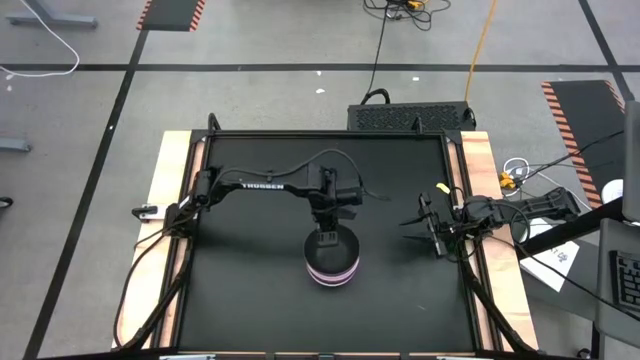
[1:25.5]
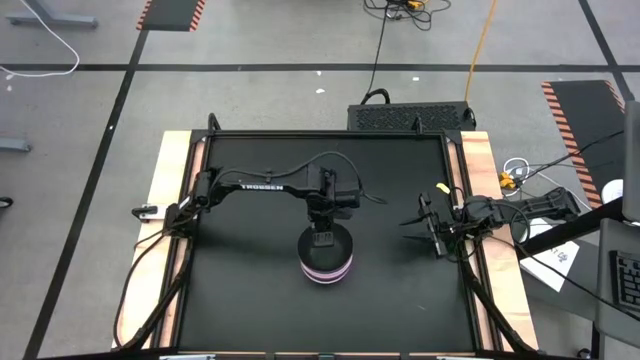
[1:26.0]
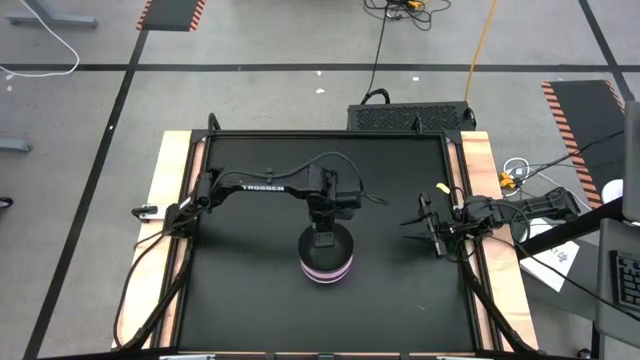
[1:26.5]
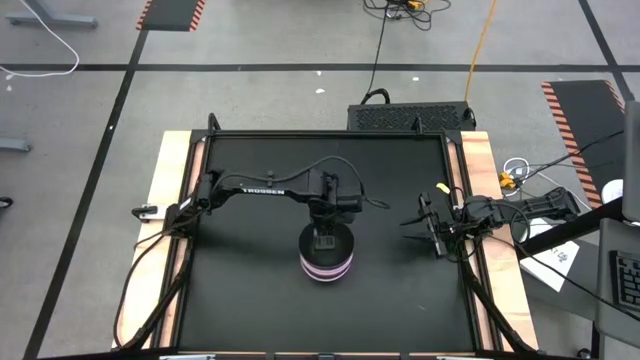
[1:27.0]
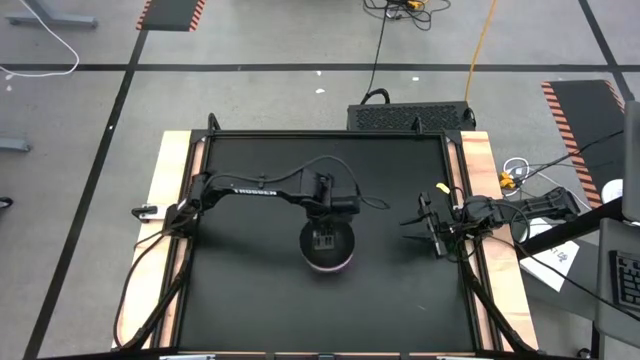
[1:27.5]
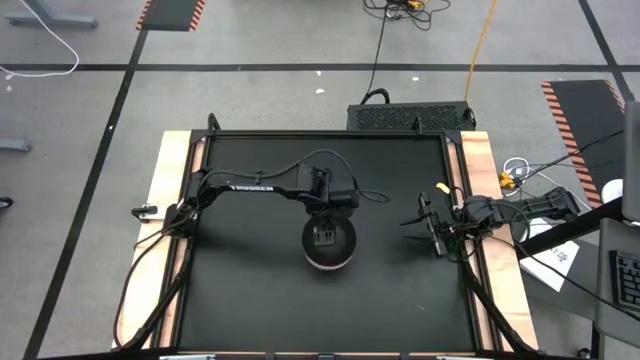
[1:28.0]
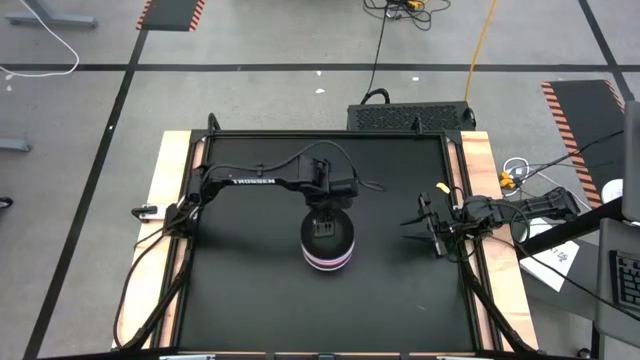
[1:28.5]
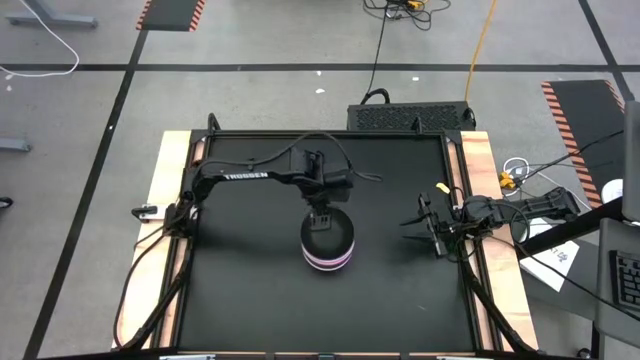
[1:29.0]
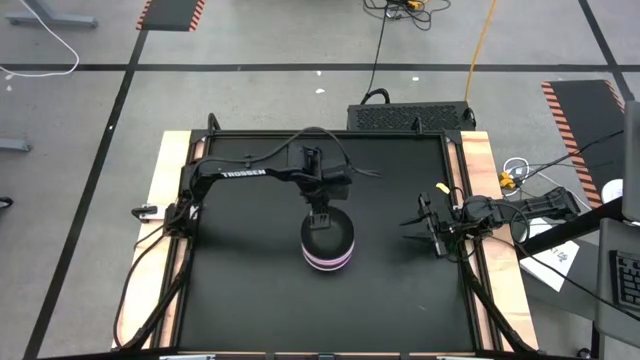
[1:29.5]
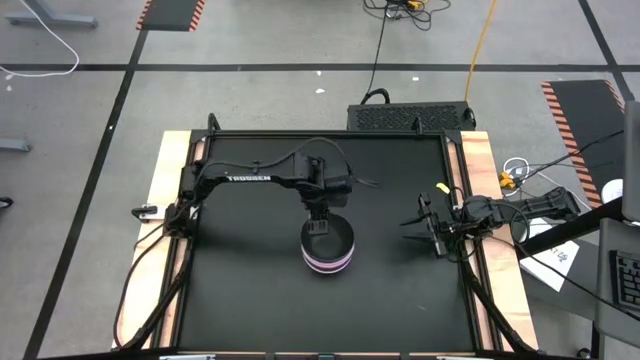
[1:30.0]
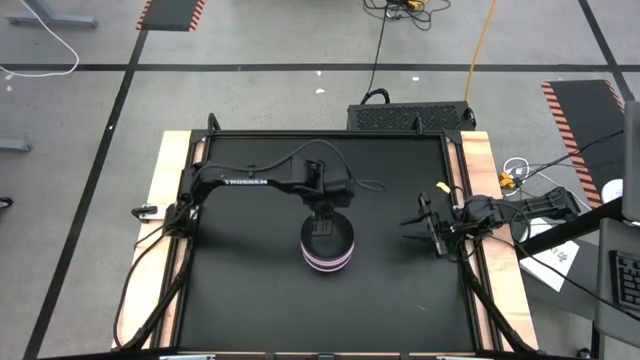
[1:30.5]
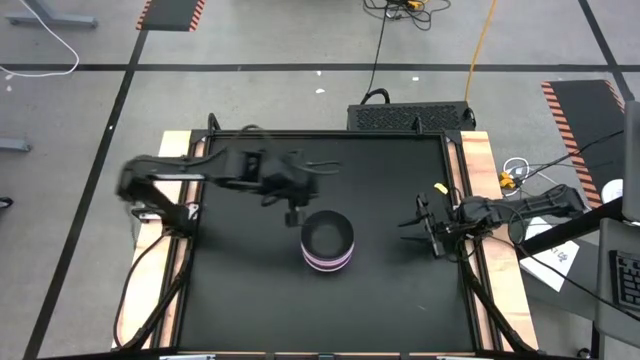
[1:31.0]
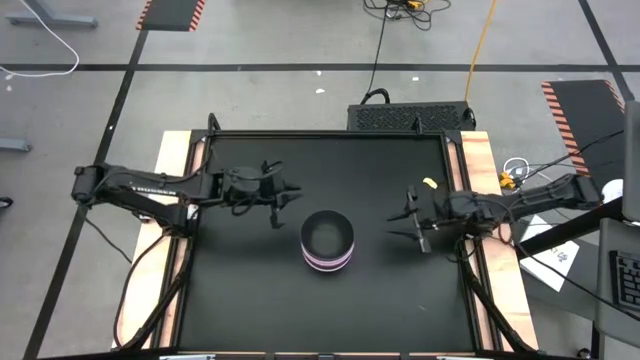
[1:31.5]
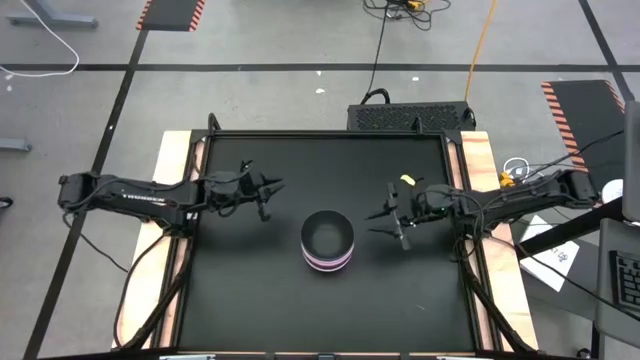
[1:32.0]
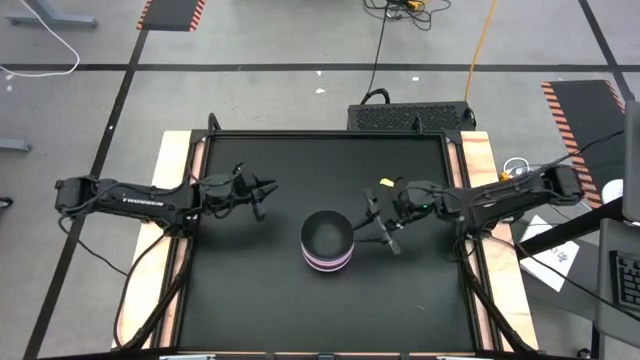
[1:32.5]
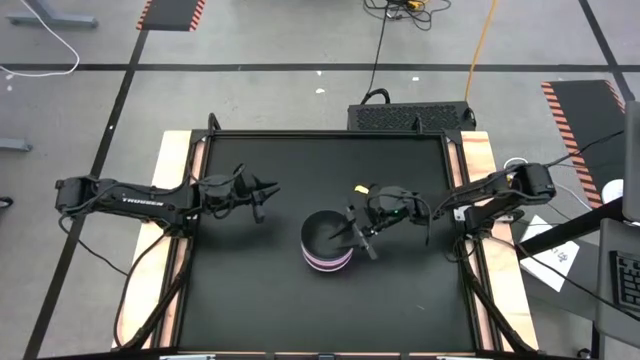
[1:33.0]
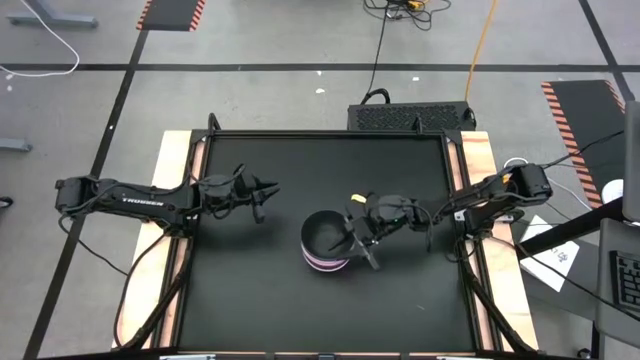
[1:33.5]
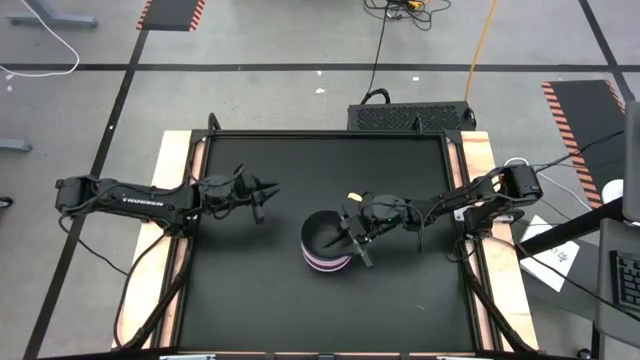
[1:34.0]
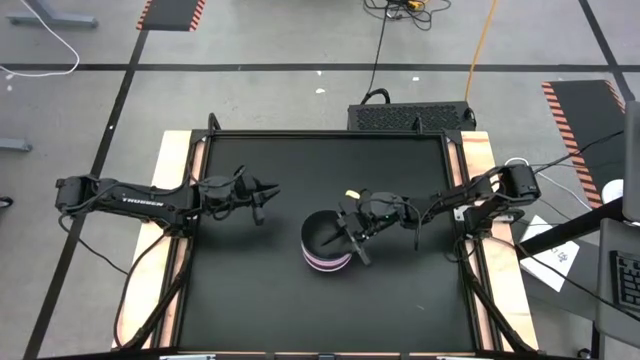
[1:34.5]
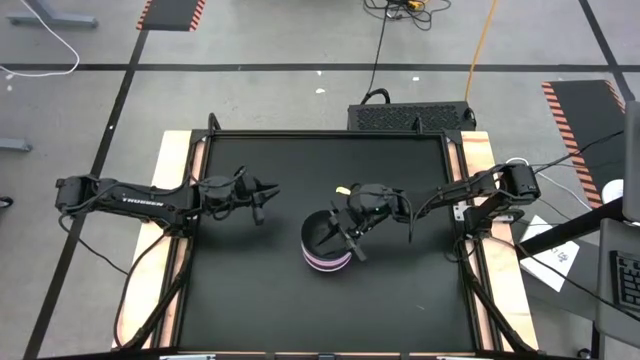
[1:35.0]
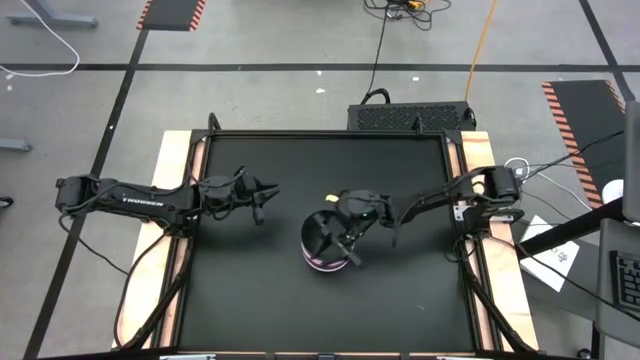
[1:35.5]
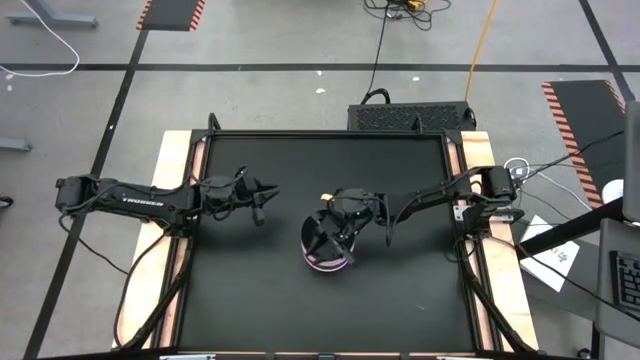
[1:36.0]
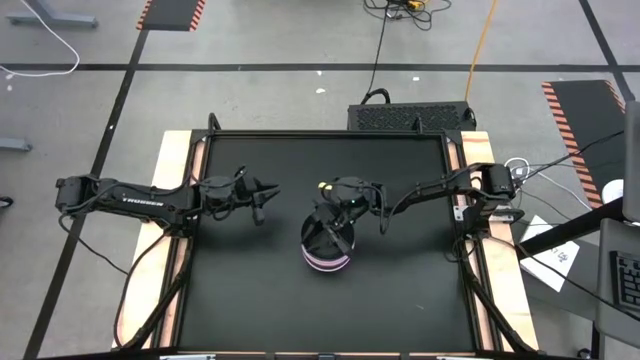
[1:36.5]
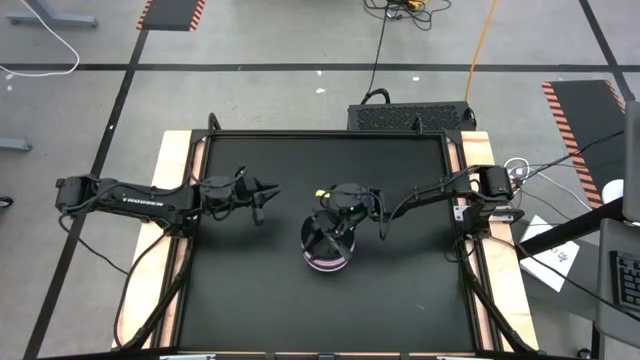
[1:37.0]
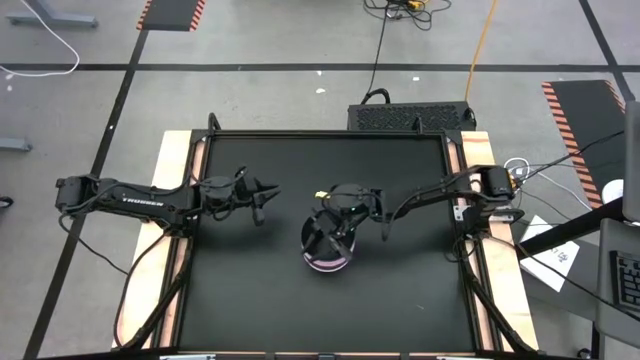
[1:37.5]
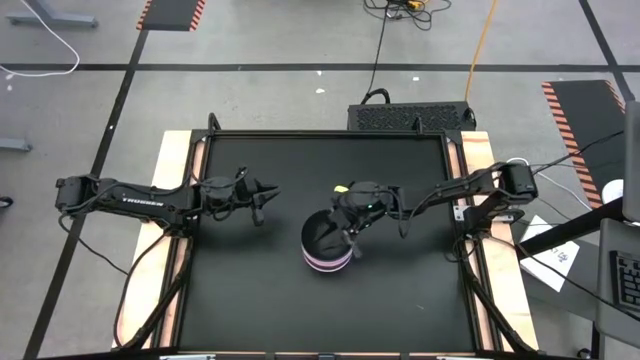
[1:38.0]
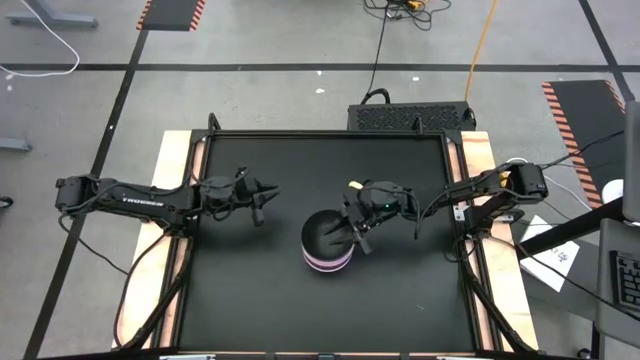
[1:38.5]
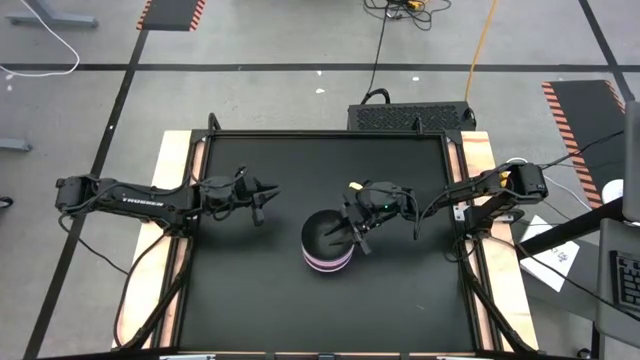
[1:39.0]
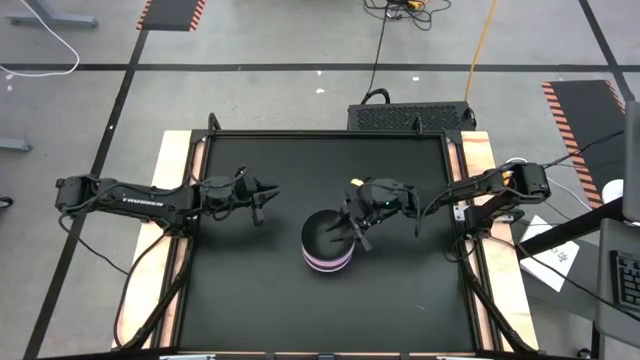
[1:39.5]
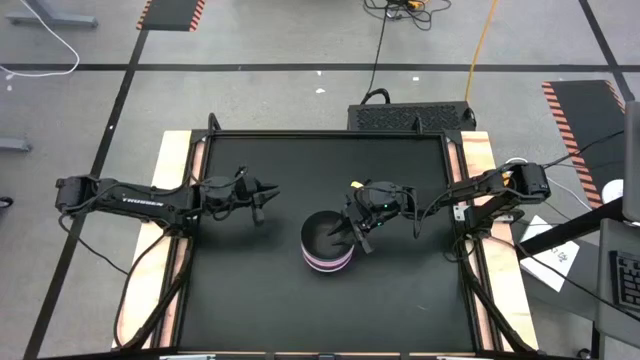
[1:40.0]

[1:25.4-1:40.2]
Task: Nest bowls inside each other
Stack the black bowl into the purple bowl

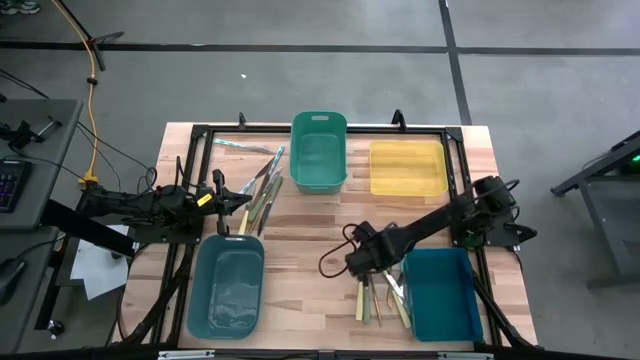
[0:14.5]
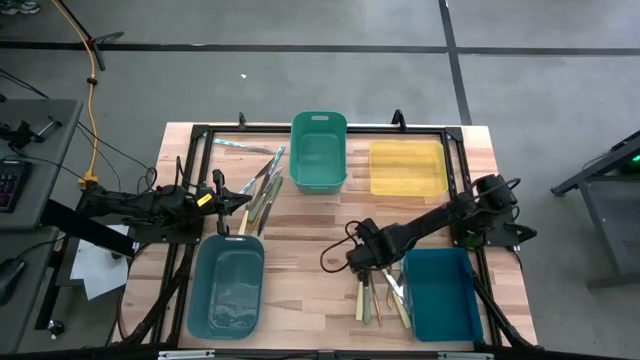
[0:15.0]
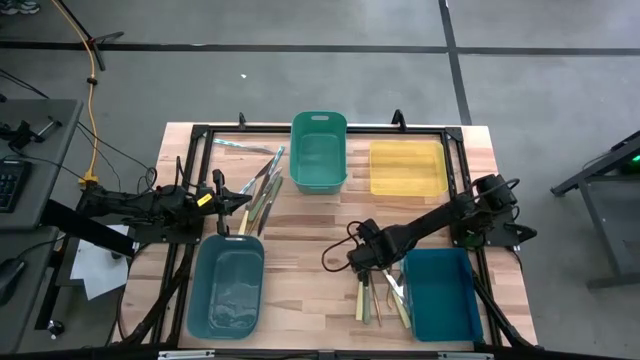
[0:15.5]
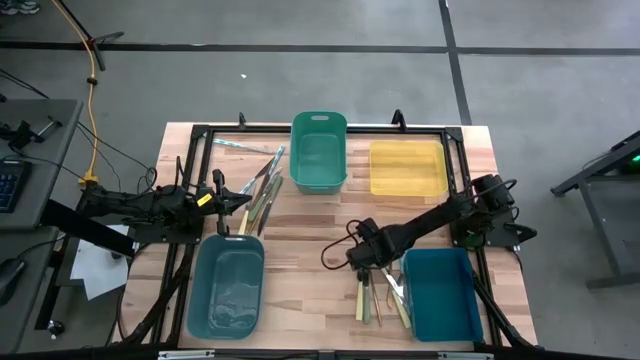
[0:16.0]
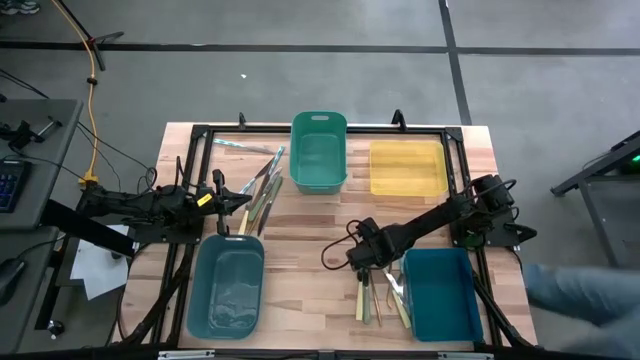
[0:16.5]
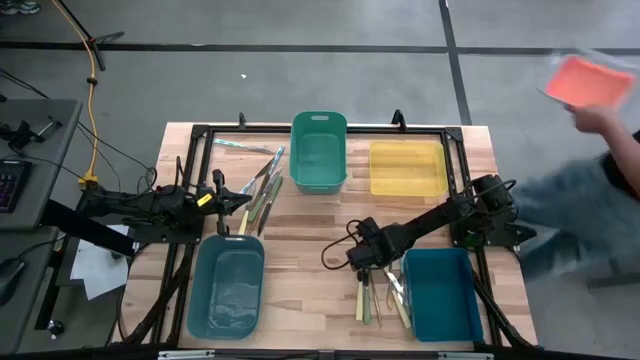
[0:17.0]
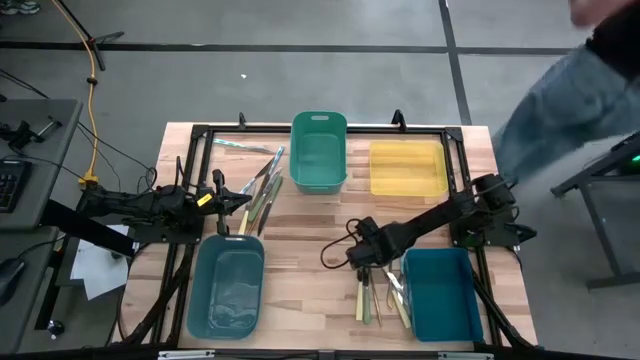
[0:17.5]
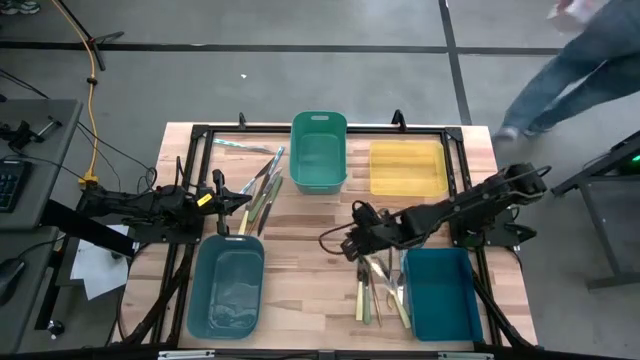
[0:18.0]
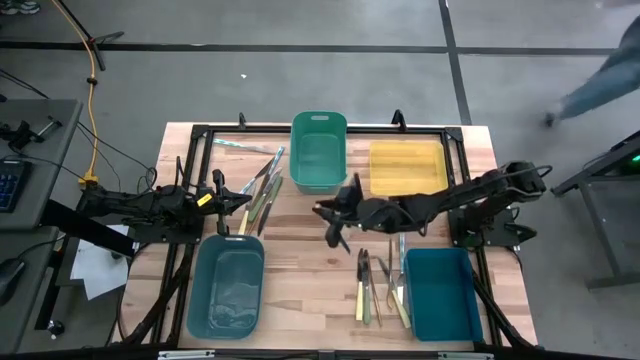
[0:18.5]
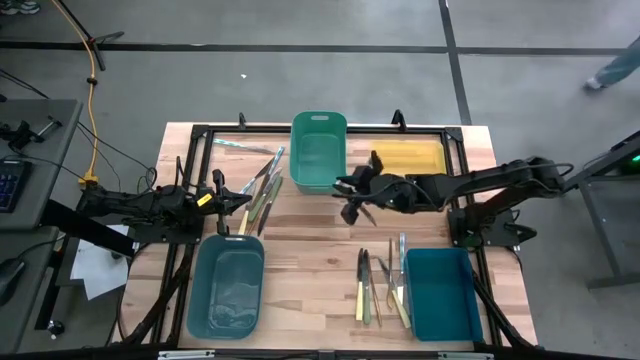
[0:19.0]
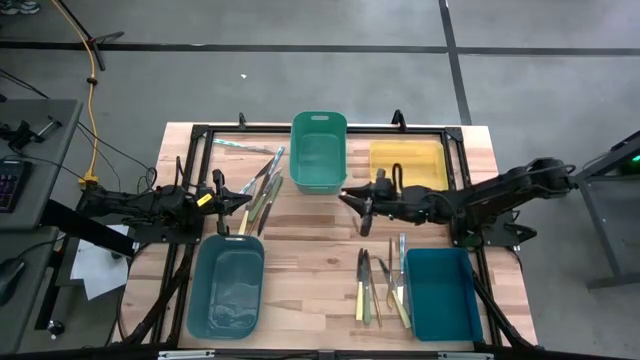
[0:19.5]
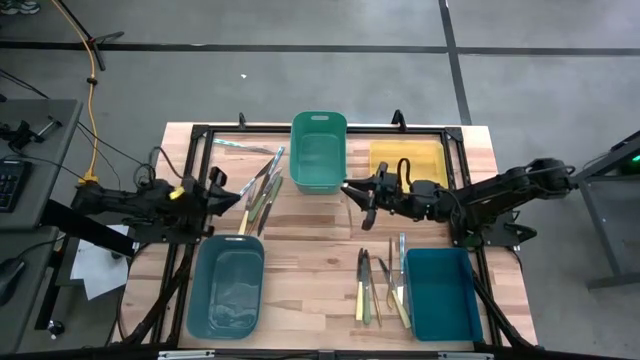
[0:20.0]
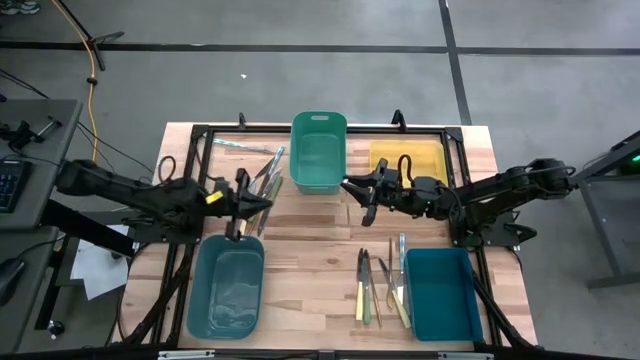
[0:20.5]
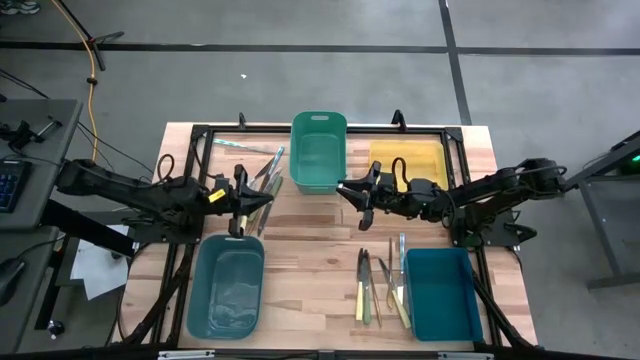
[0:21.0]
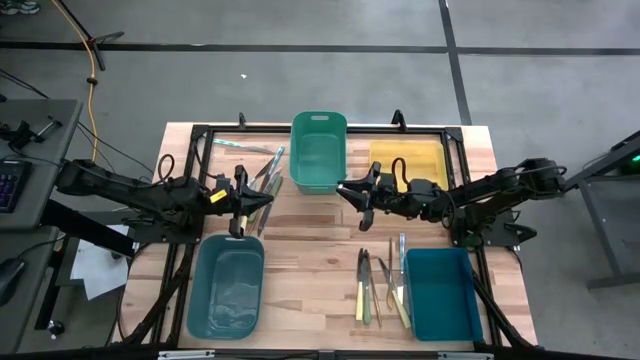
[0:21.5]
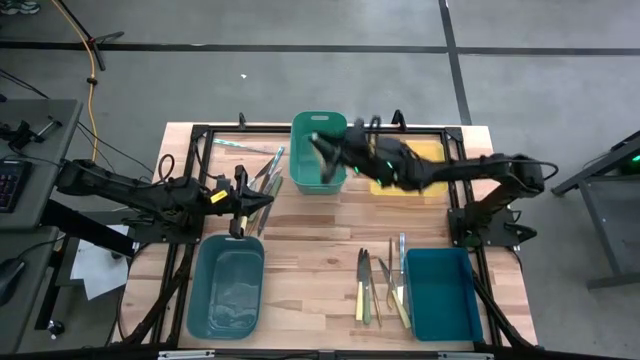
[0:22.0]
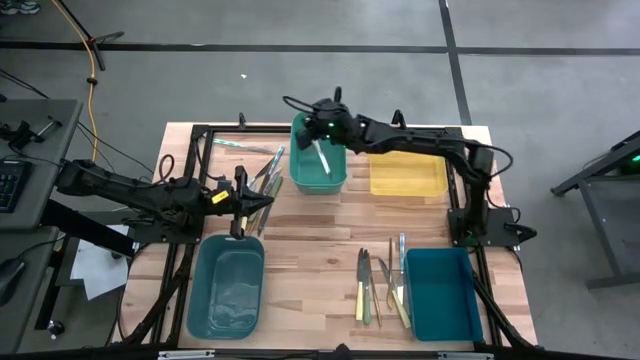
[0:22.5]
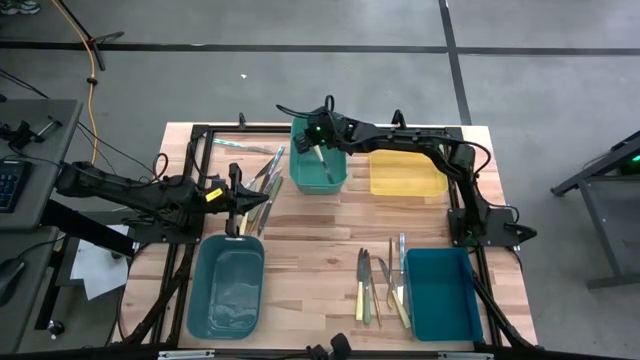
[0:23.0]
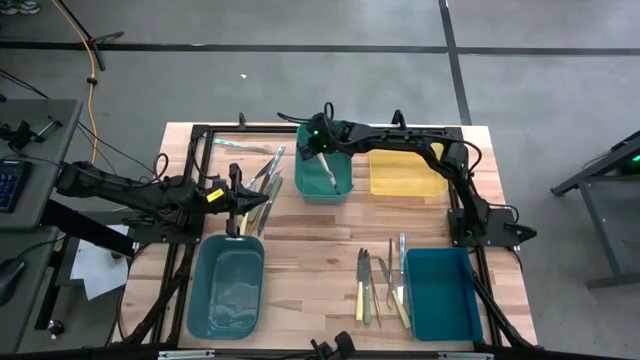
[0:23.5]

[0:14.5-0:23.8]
Task: Sort silverware by color (type)
Put the yellow knife into the green bin
